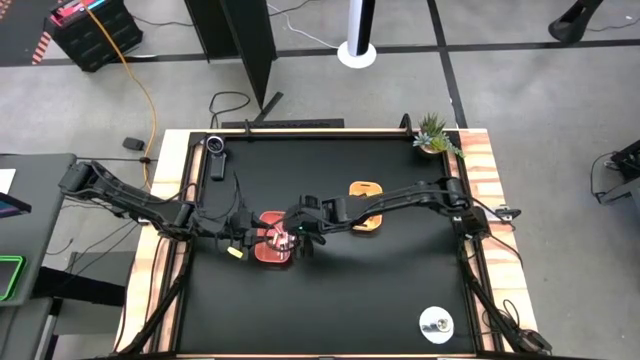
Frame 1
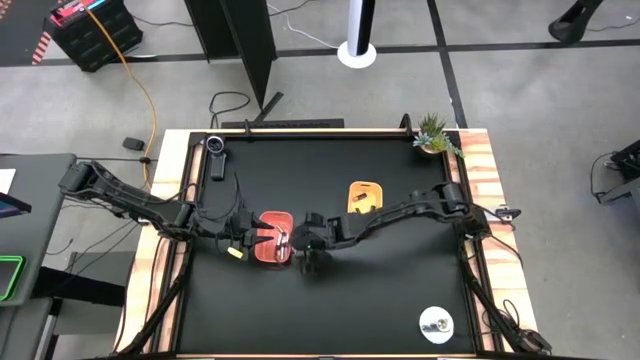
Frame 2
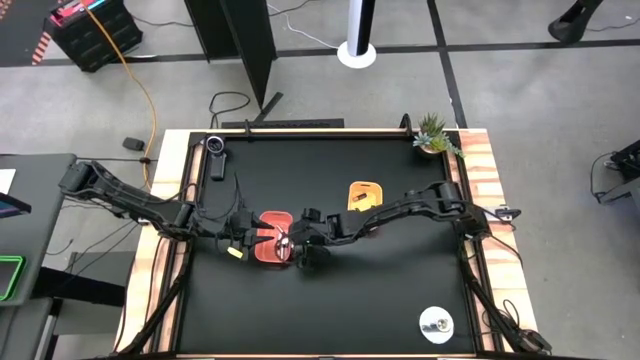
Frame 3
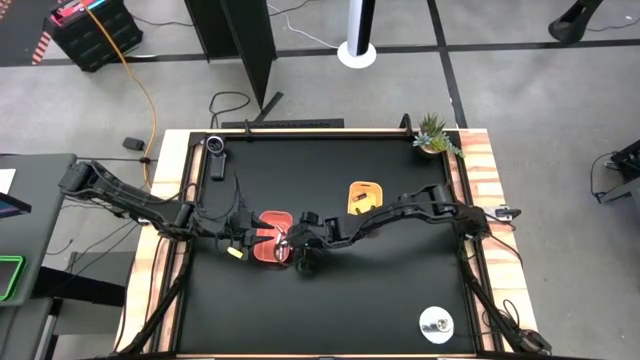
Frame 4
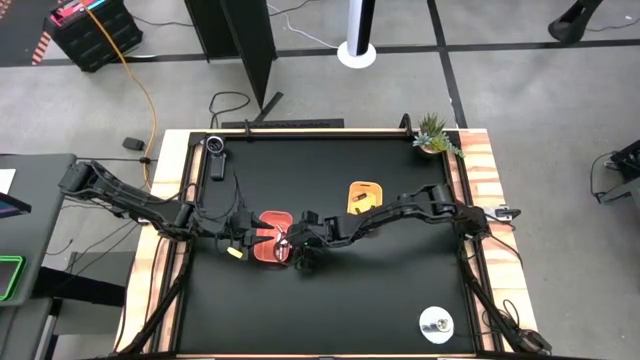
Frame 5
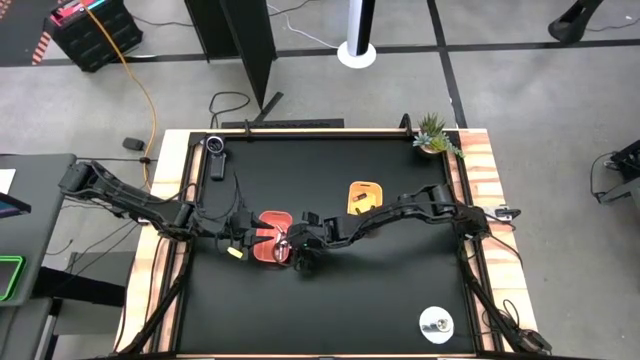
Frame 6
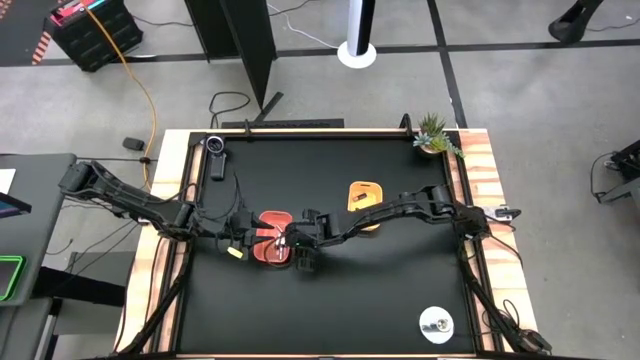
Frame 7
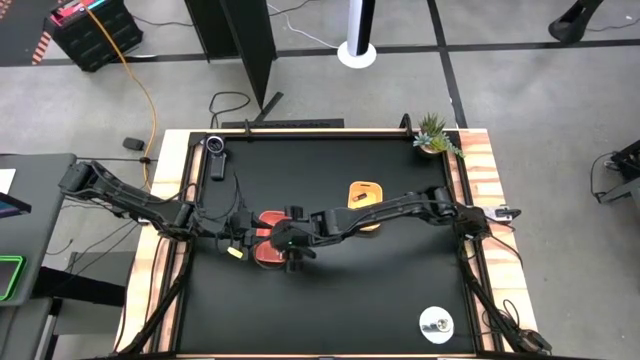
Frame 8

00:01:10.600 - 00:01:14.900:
Task: Sort batteries
Put the big silver battery into the orange bin

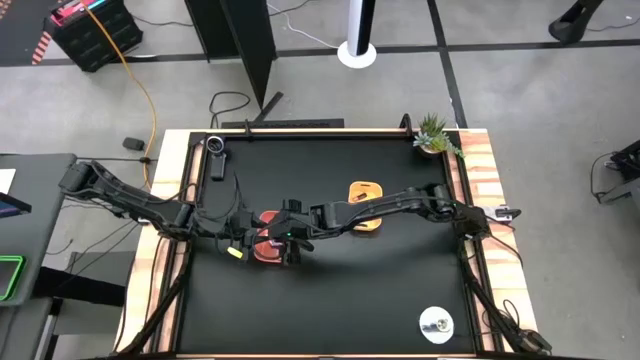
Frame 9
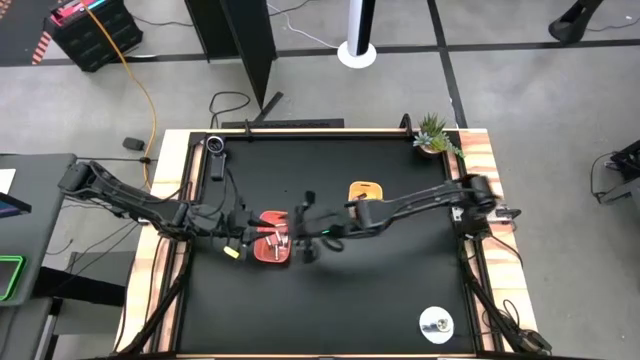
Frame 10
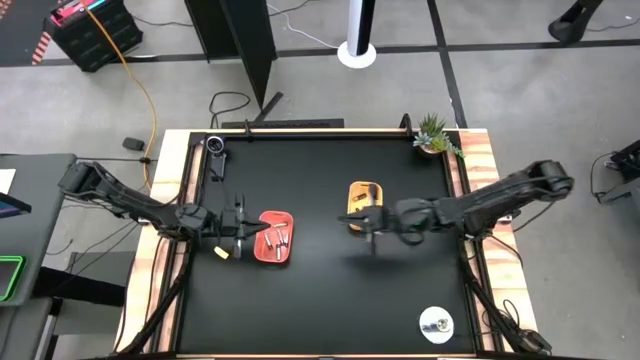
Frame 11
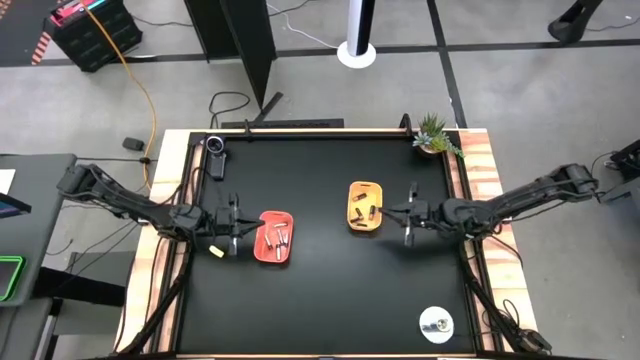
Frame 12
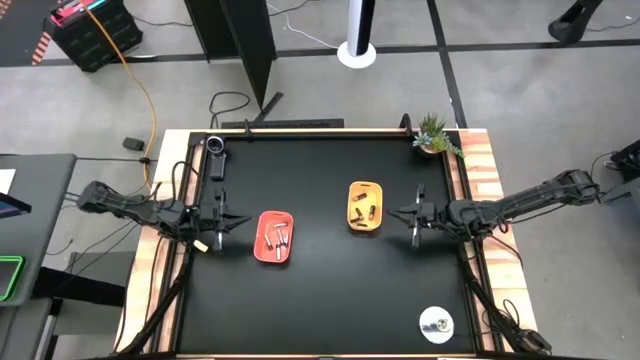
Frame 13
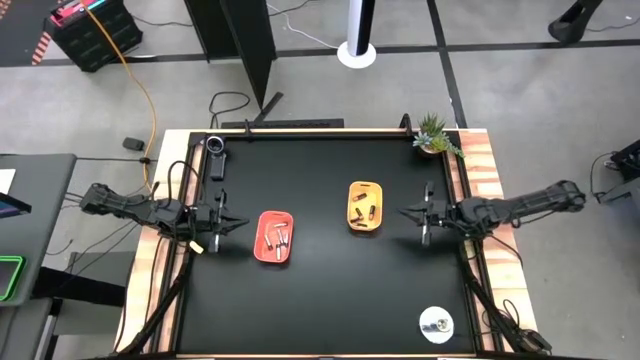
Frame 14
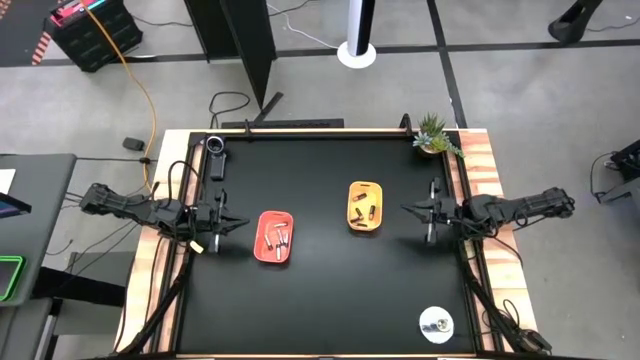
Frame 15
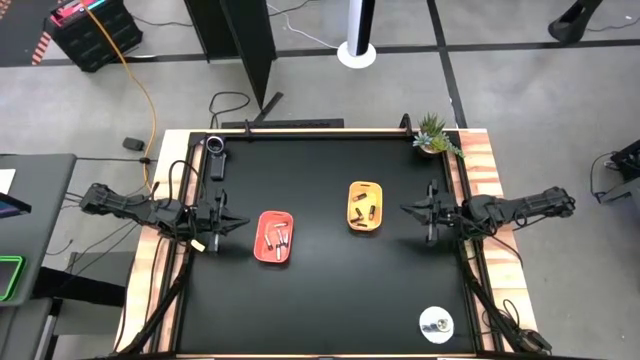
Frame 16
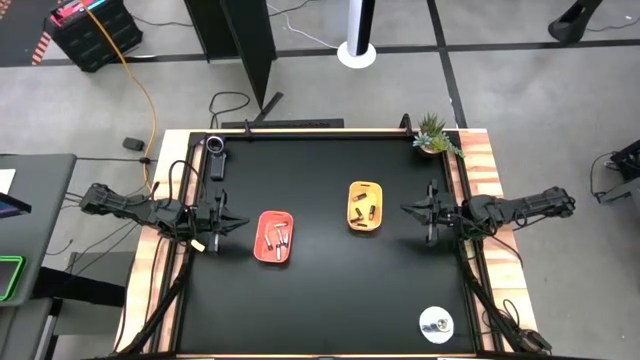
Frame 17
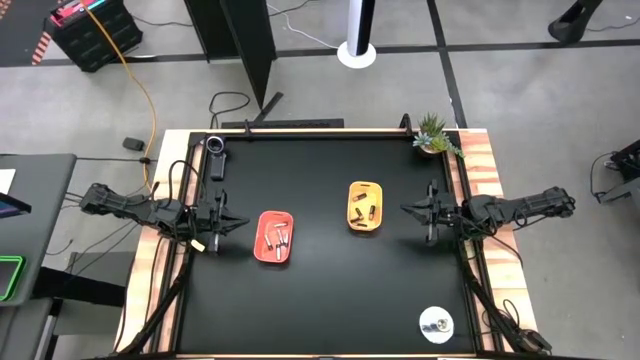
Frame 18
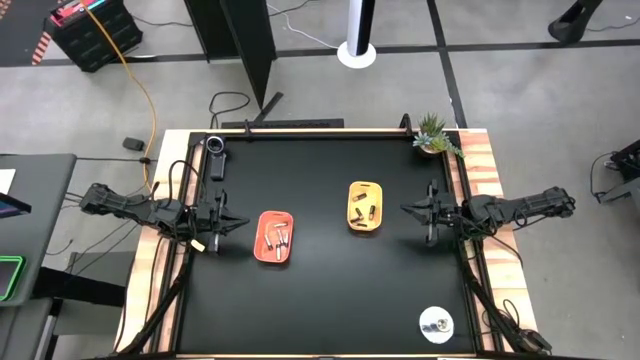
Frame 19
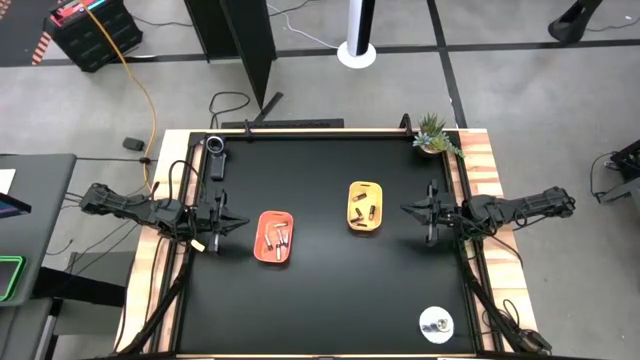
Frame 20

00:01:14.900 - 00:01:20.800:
Return to Home Position

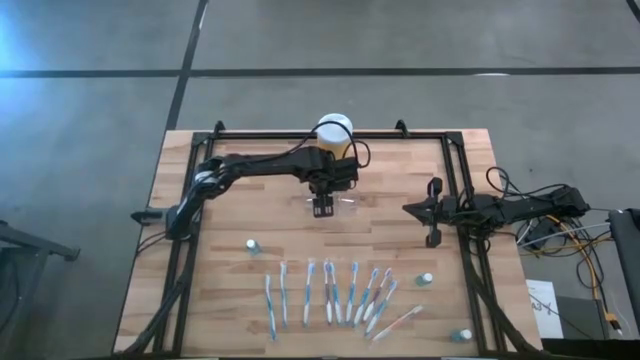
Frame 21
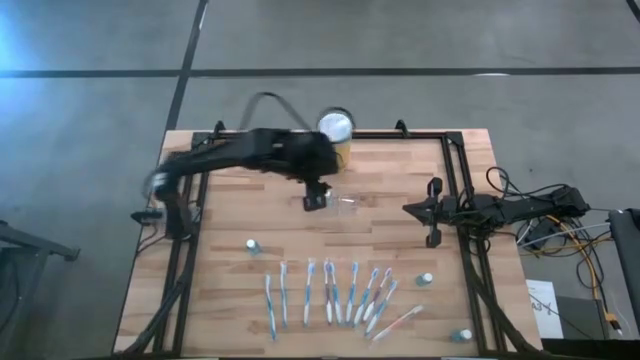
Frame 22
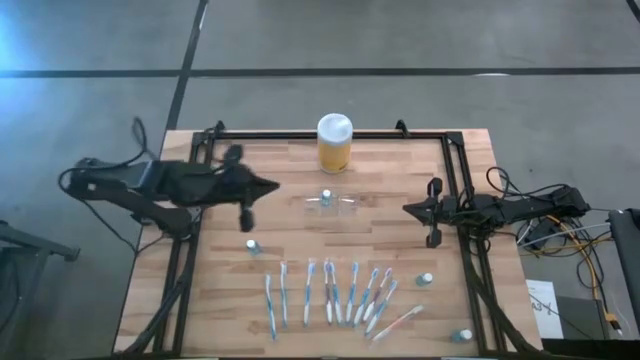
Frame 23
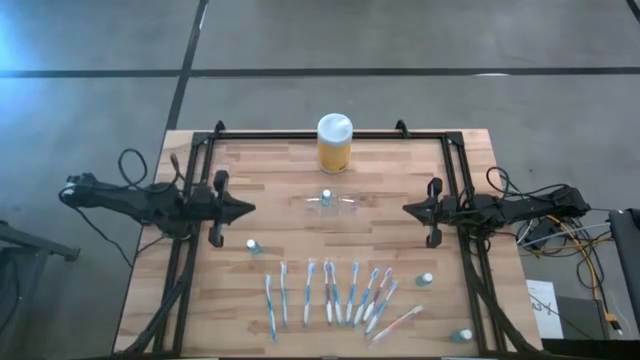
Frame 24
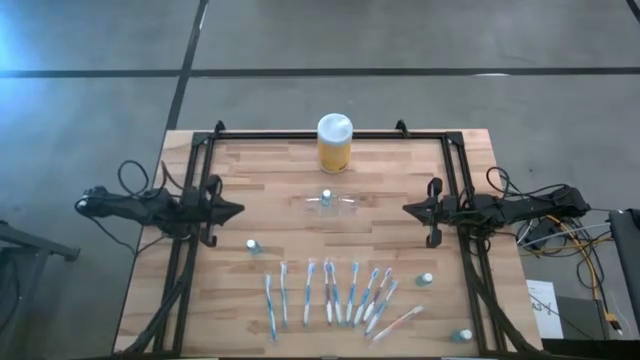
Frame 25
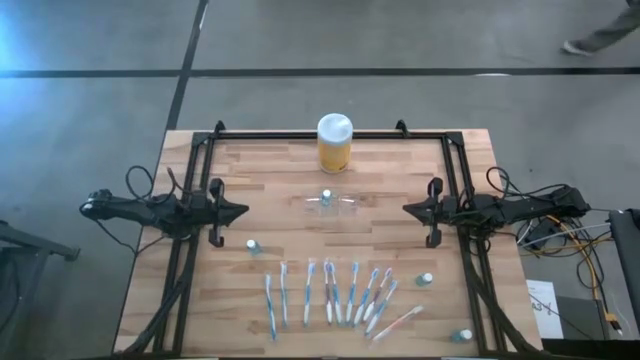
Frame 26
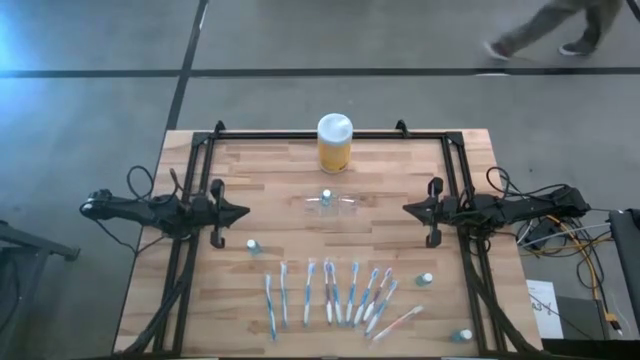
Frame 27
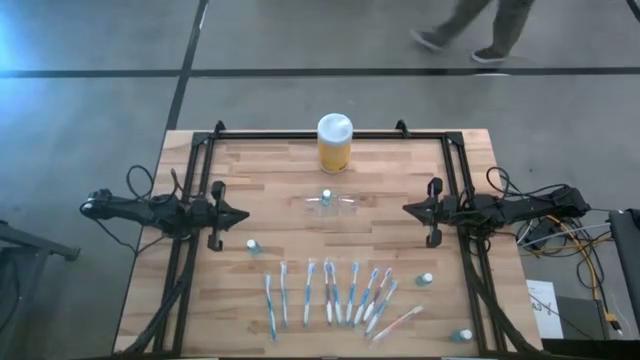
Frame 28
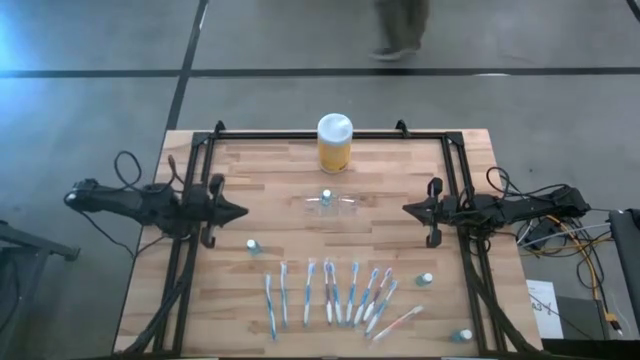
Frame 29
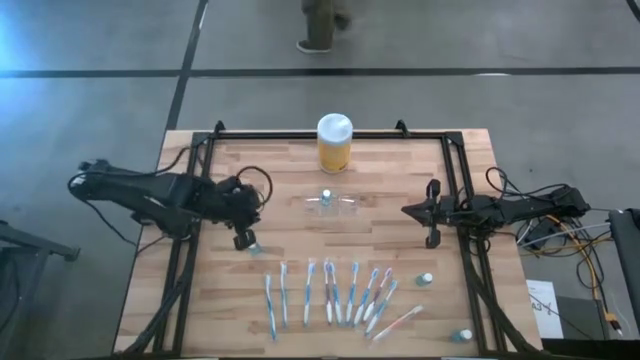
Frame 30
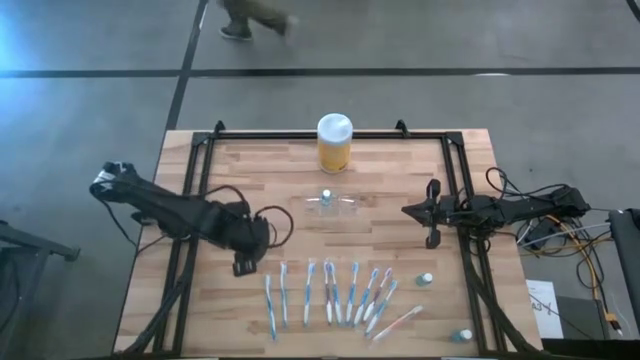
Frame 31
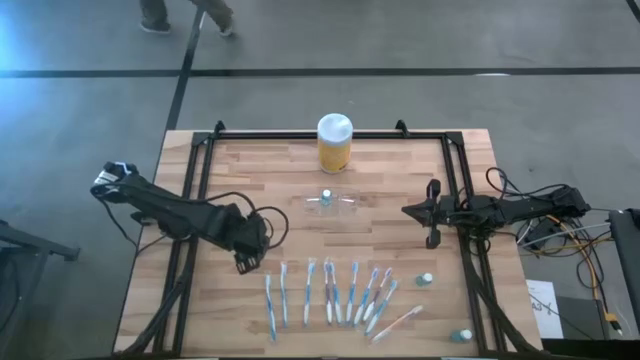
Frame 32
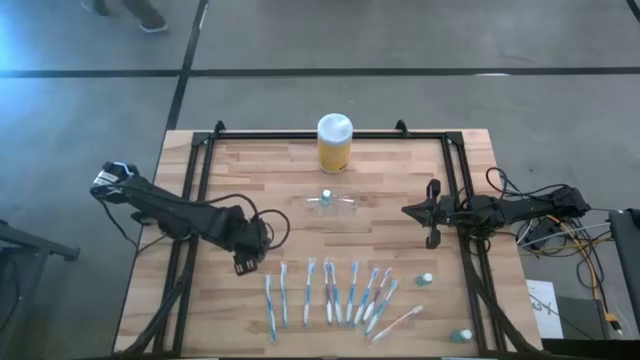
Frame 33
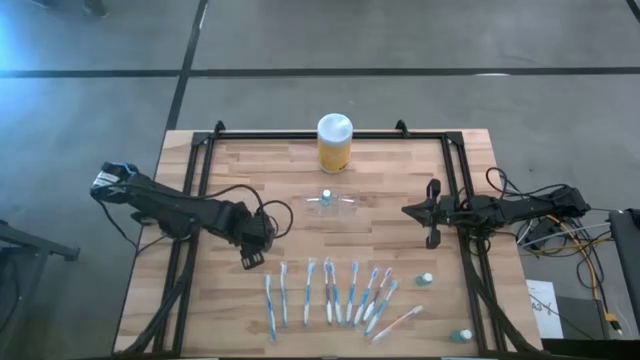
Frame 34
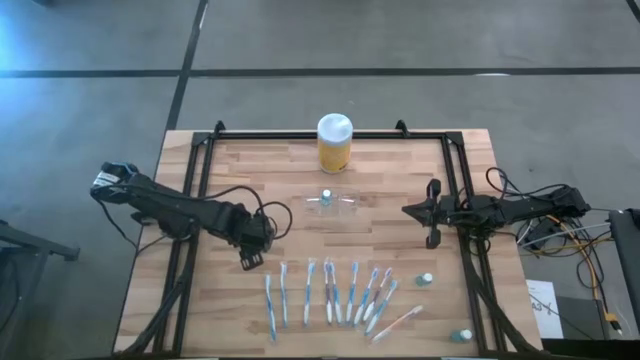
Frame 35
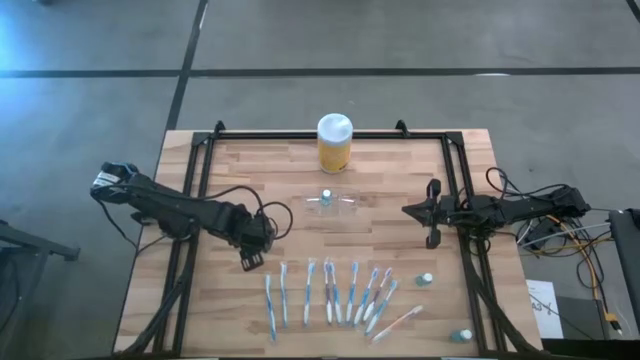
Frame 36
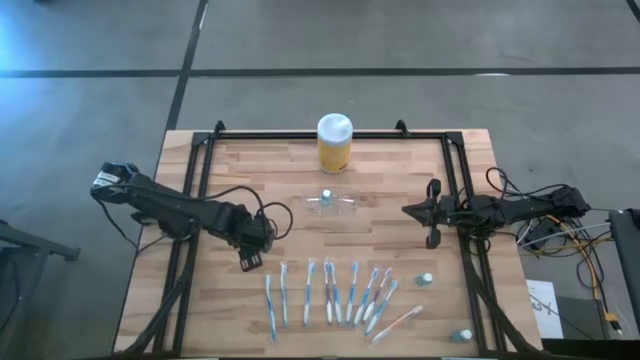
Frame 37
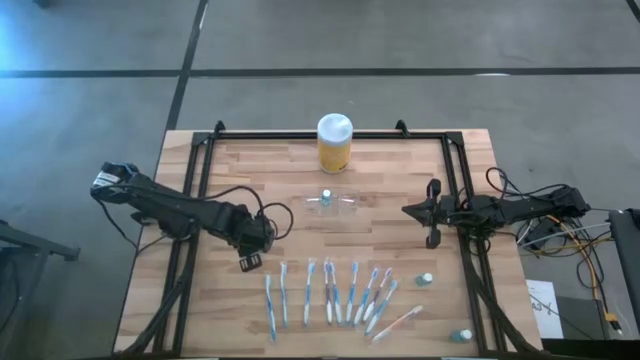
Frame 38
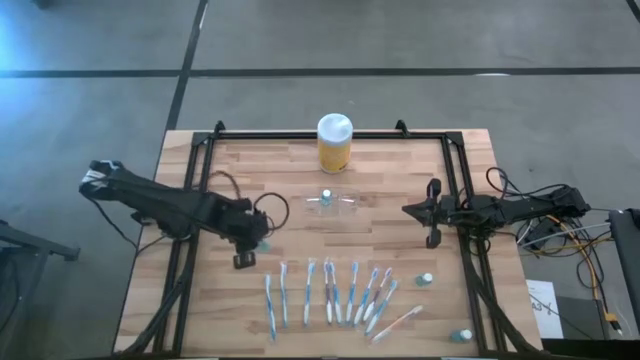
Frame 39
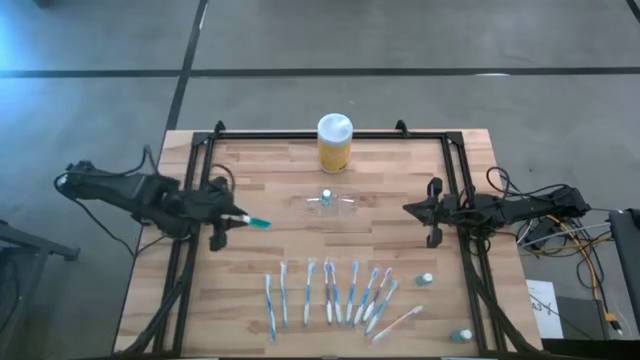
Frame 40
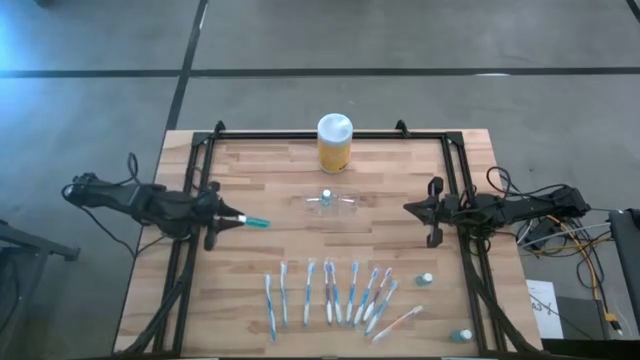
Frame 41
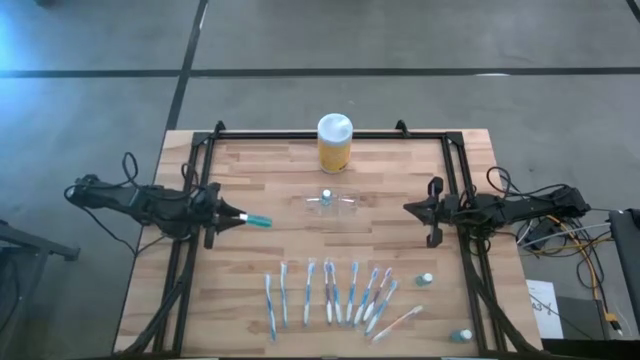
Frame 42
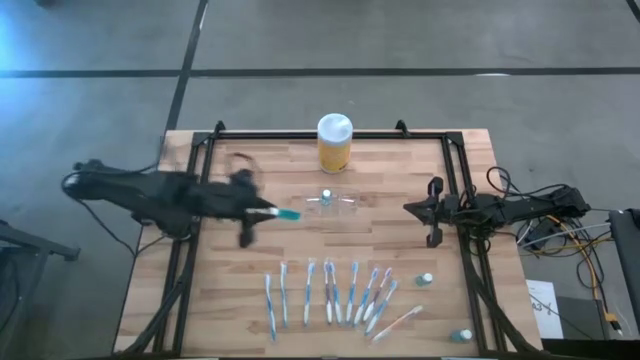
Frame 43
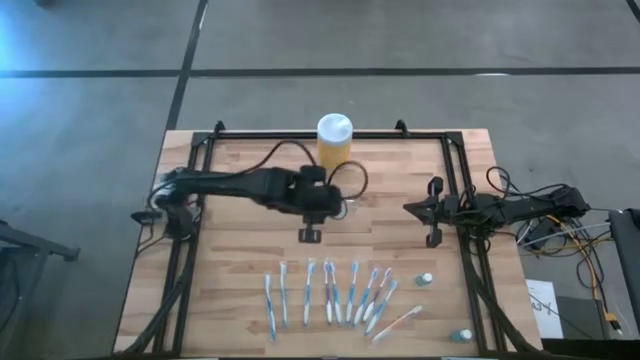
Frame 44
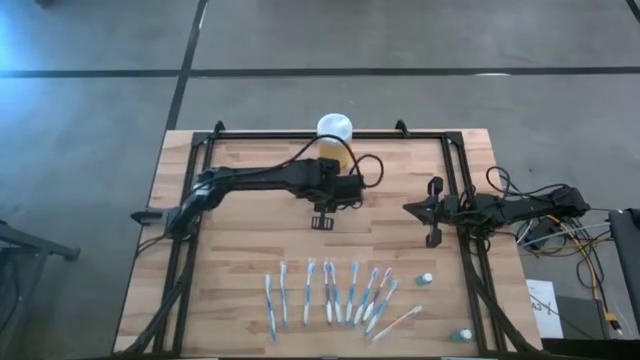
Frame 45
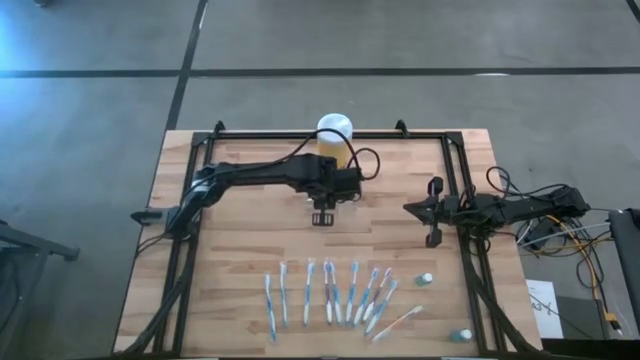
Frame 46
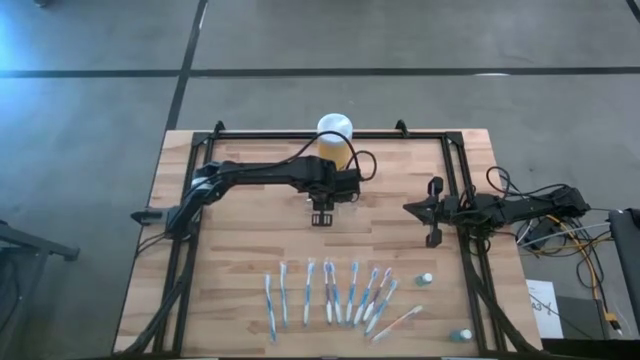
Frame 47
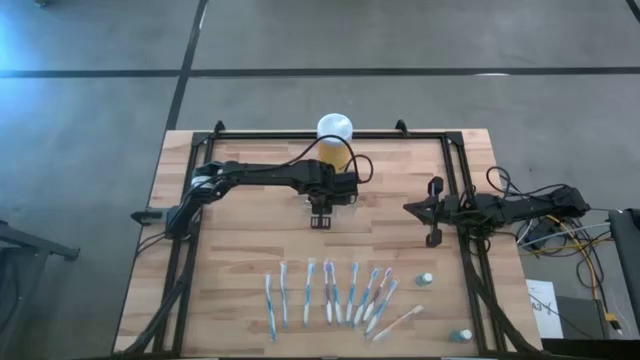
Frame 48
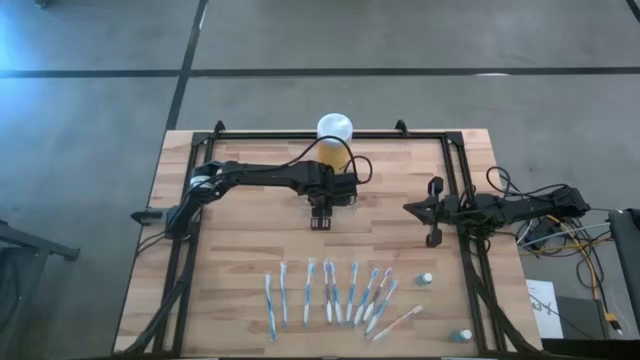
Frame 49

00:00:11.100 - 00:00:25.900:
Task: Pick & Place toothbrushing station
Put the blue mouthwash into the middle of the transparent organizer
